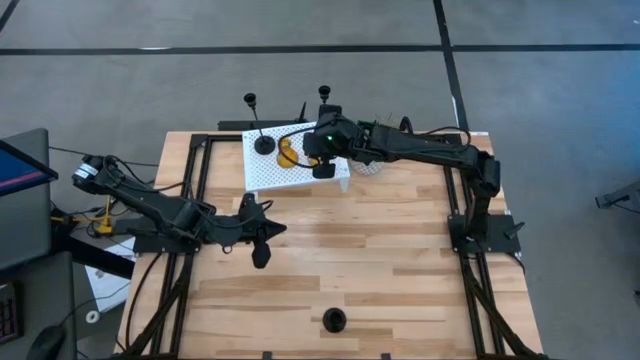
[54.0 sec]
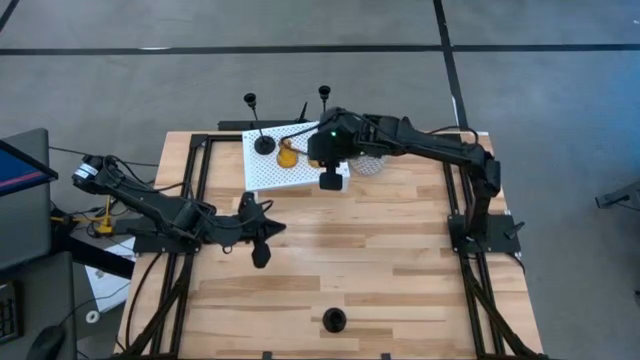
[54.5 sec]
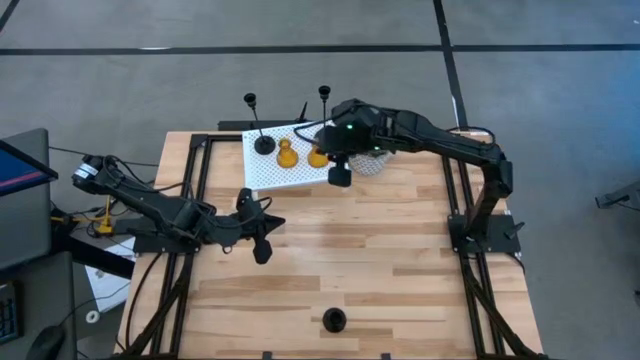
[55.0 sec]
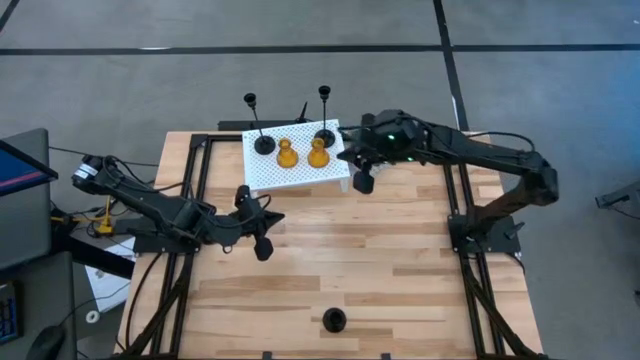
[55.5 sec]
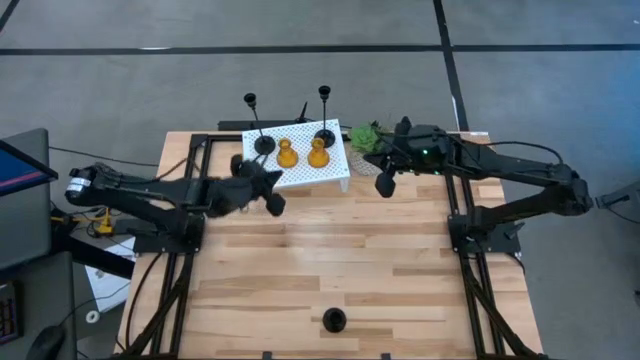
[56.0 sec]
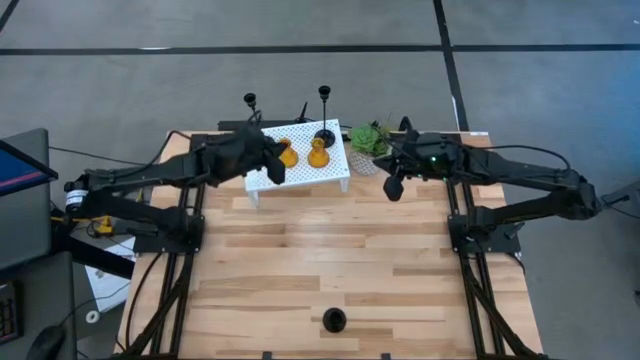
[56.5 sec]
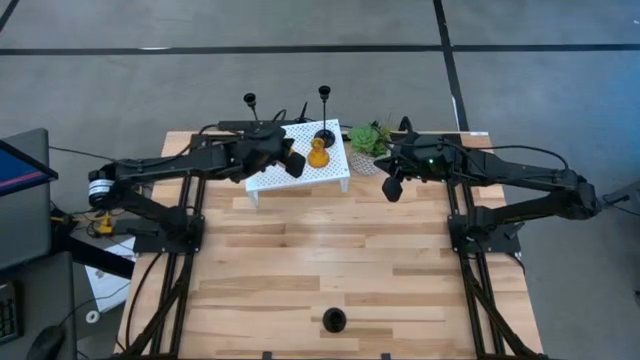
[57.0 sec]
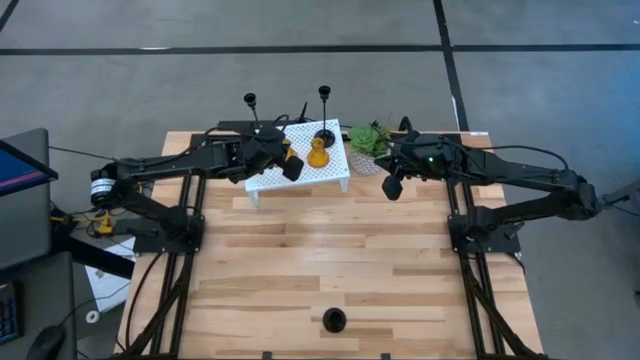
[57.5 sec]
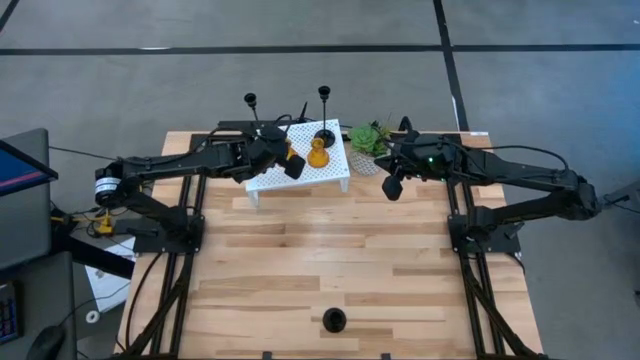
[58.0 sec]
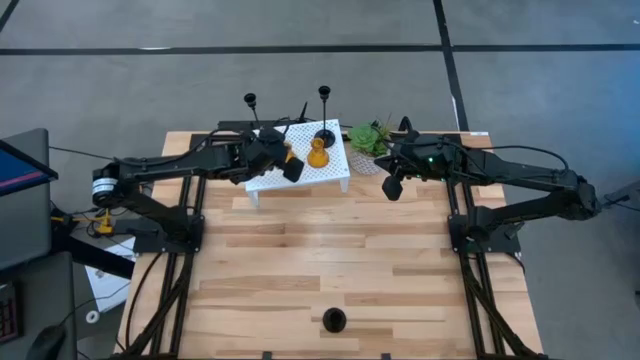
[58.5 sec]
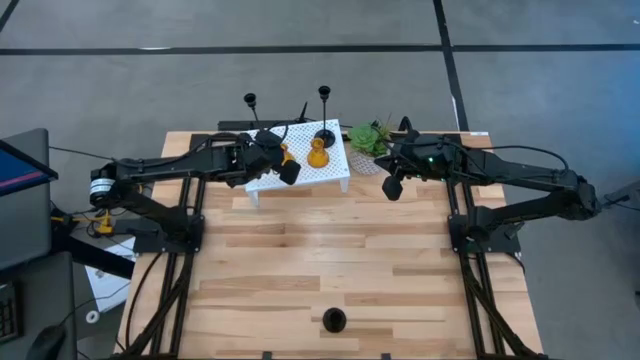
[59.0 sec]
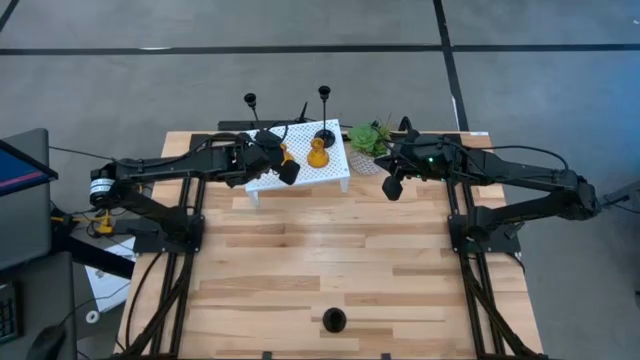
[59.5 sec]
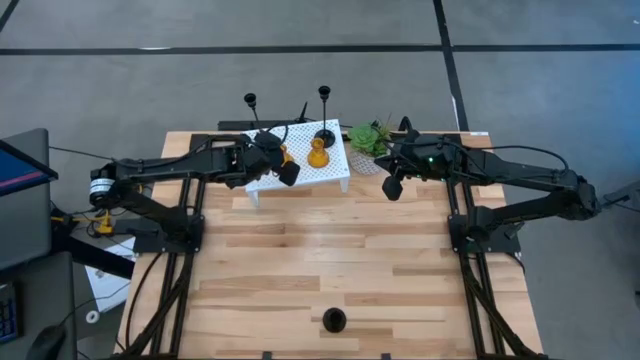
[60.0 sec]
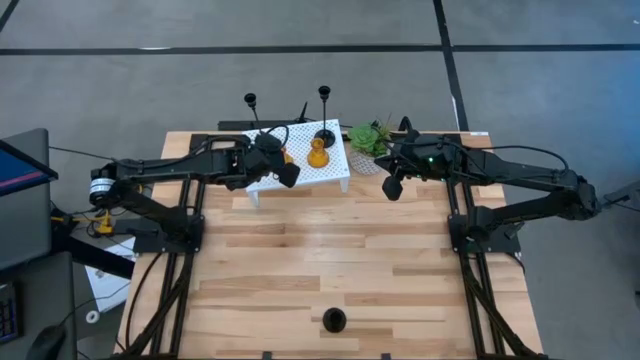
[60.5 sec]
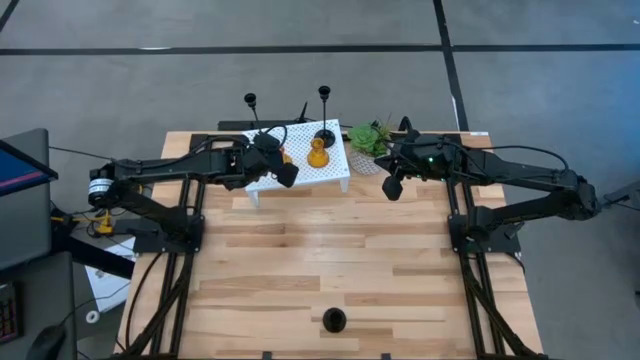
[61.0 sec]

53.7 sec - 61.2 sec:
Task: Pick & Place candle stick holders
Adjust the yellow glass candle holder on the shelf

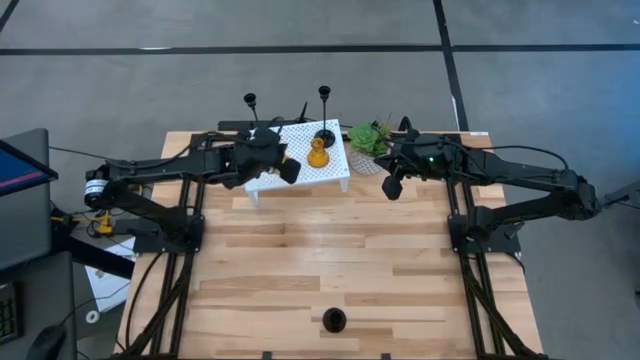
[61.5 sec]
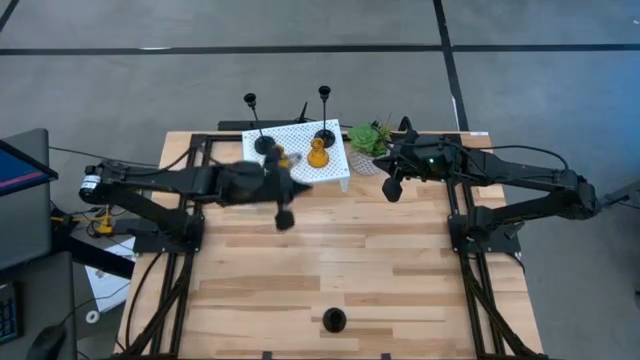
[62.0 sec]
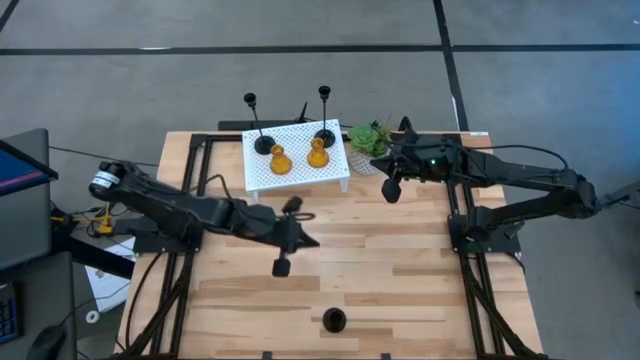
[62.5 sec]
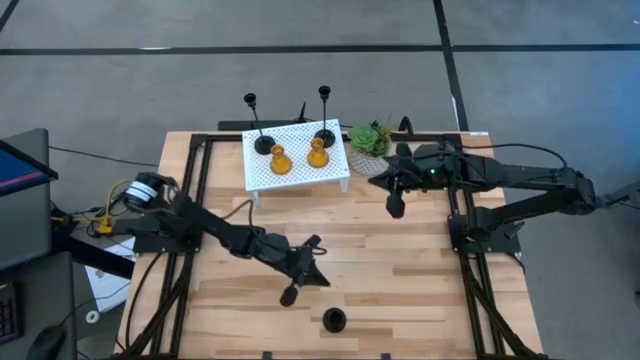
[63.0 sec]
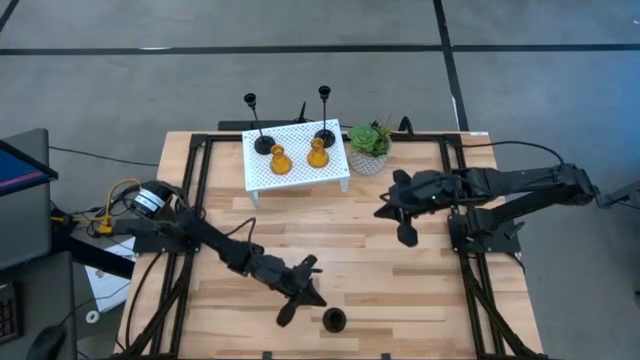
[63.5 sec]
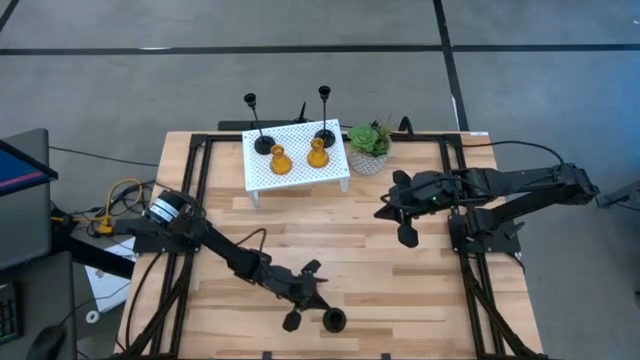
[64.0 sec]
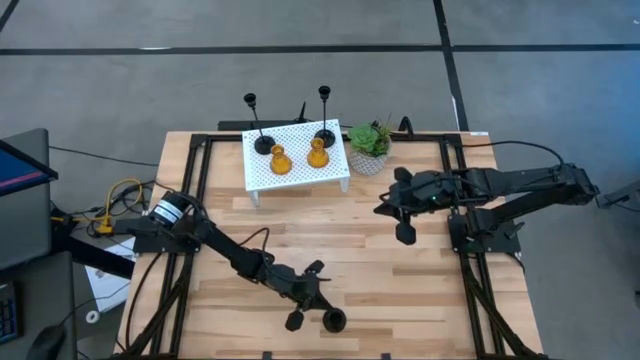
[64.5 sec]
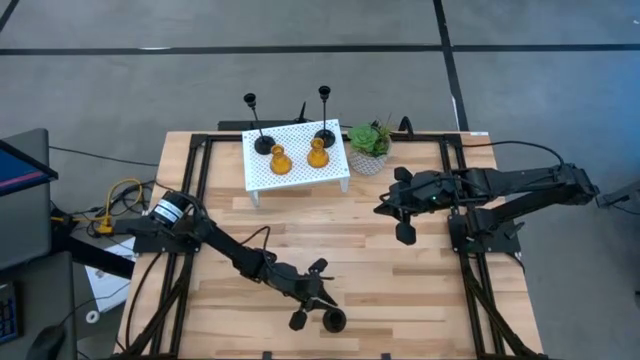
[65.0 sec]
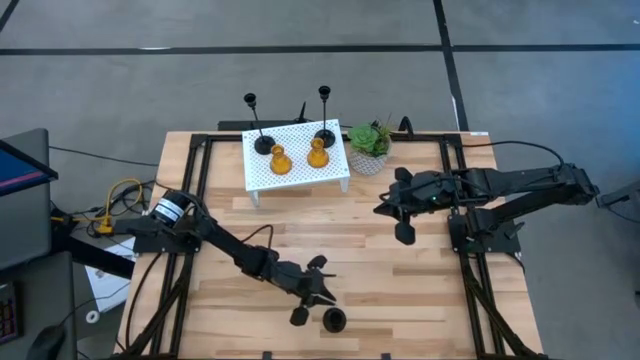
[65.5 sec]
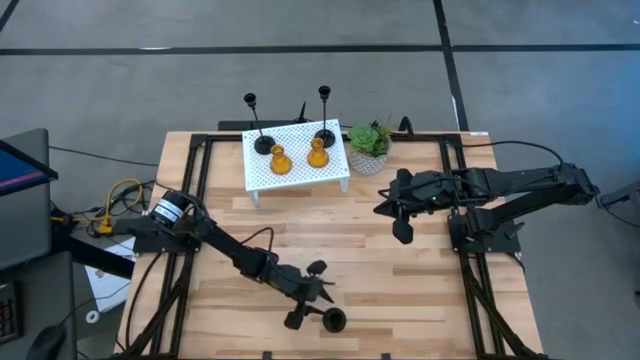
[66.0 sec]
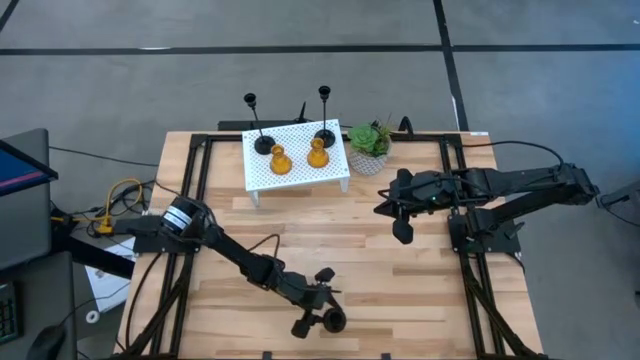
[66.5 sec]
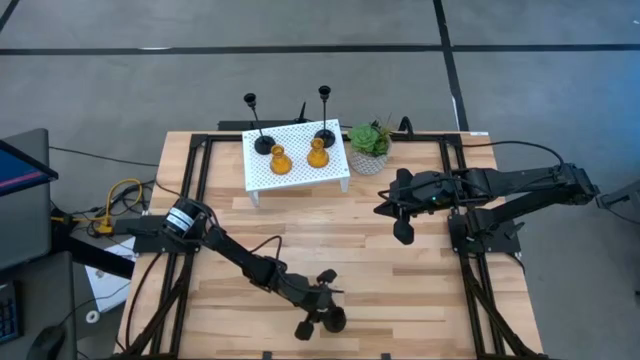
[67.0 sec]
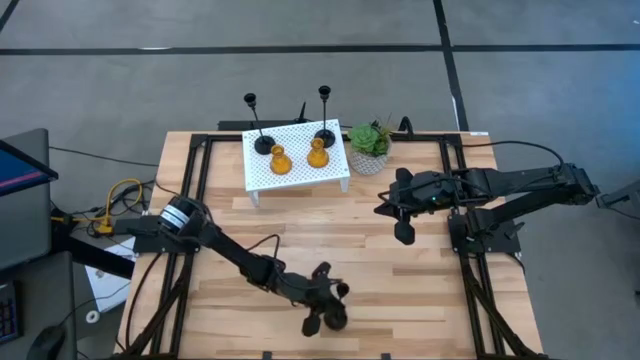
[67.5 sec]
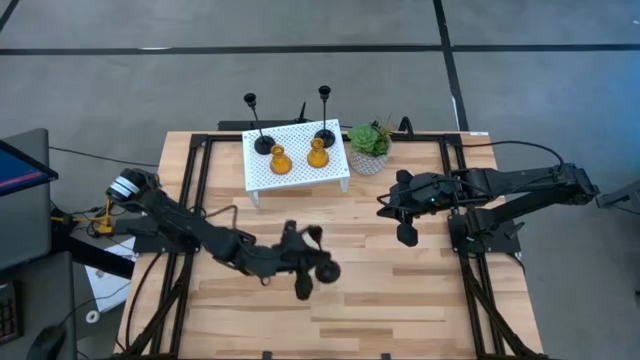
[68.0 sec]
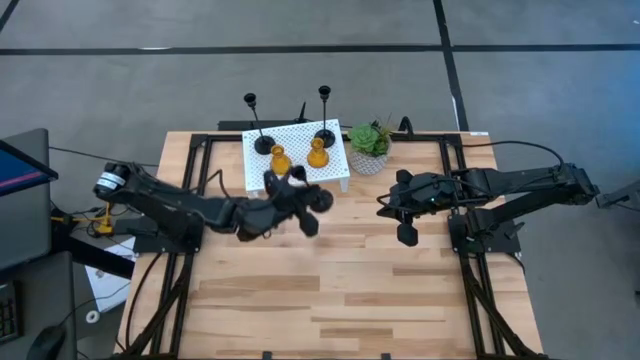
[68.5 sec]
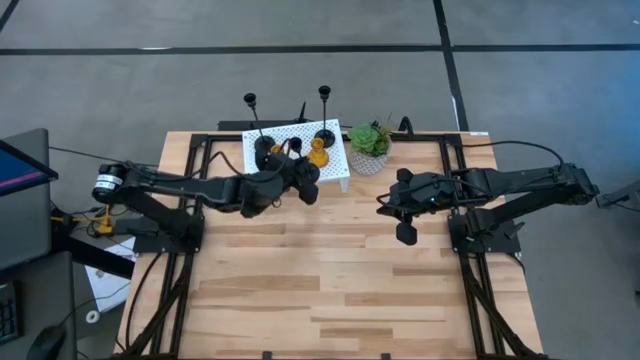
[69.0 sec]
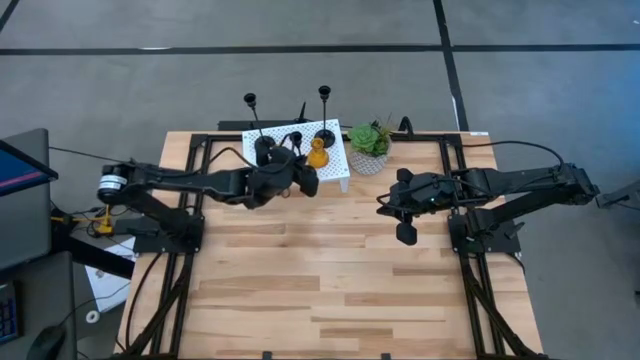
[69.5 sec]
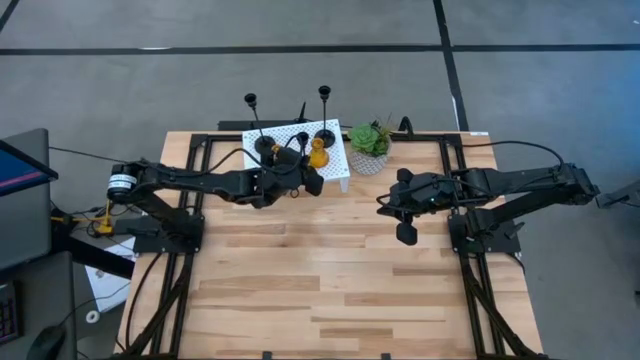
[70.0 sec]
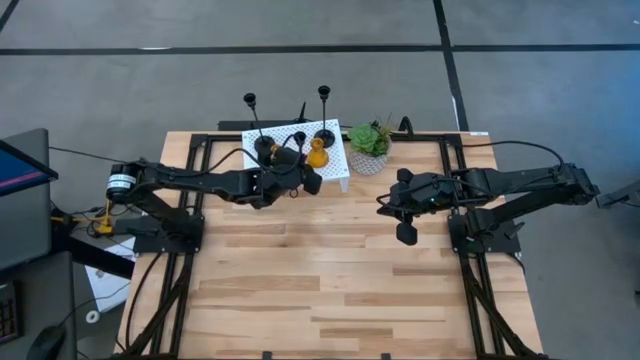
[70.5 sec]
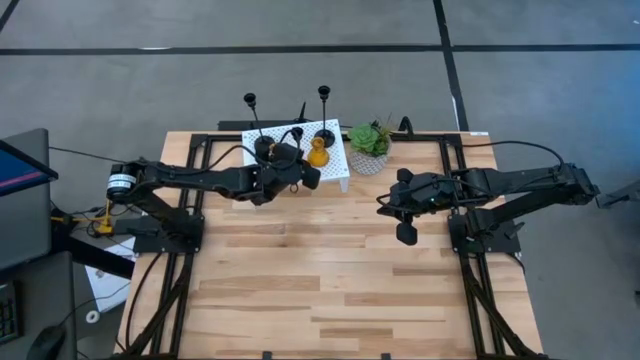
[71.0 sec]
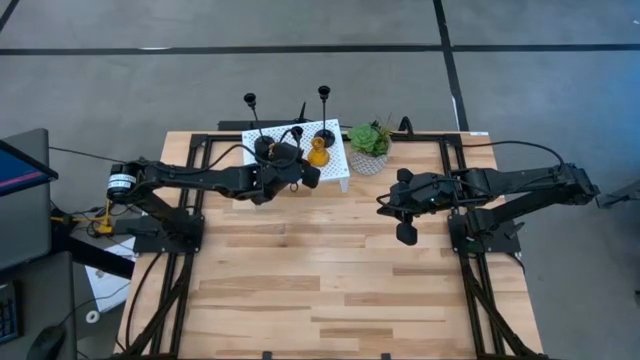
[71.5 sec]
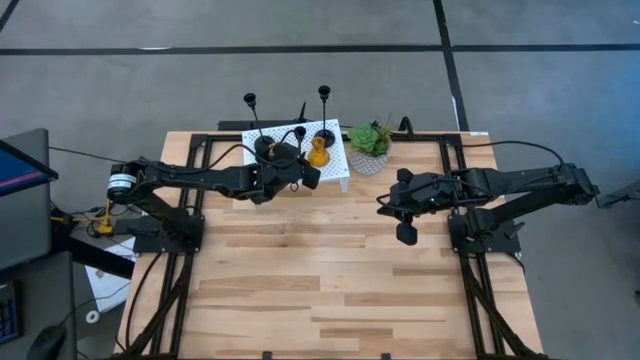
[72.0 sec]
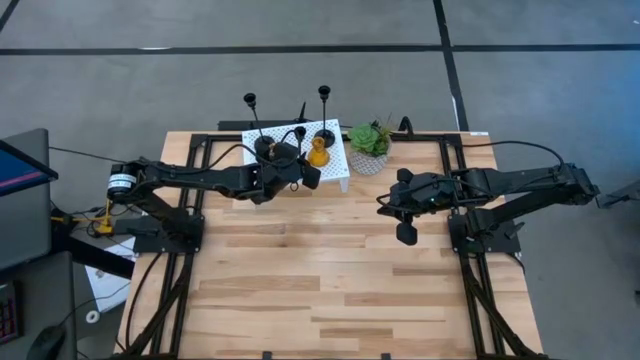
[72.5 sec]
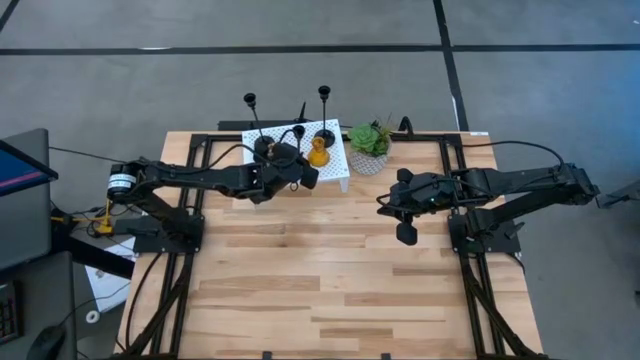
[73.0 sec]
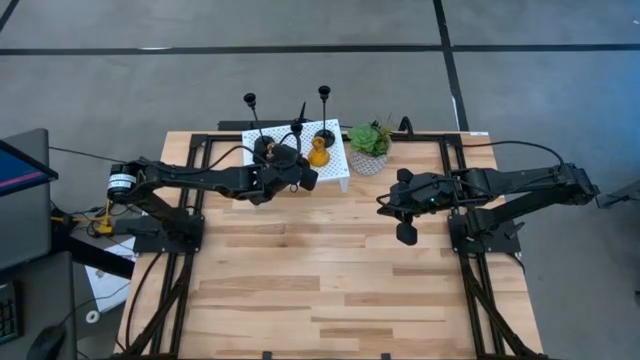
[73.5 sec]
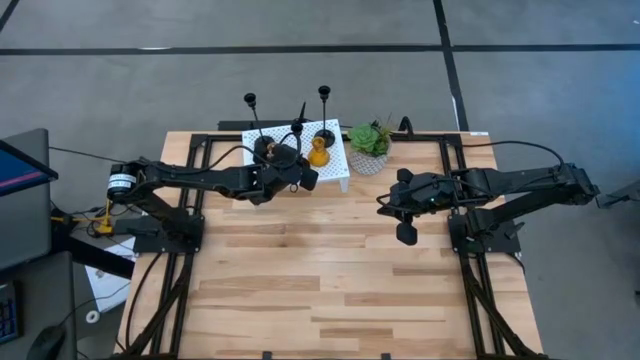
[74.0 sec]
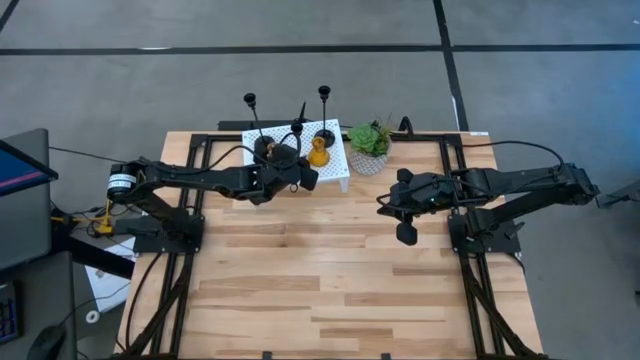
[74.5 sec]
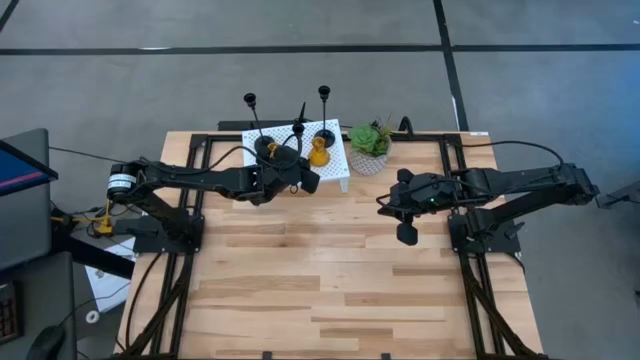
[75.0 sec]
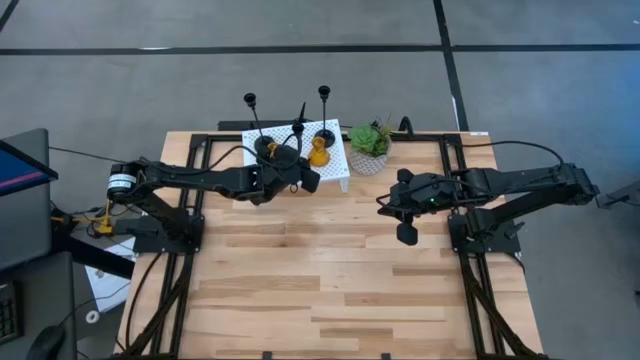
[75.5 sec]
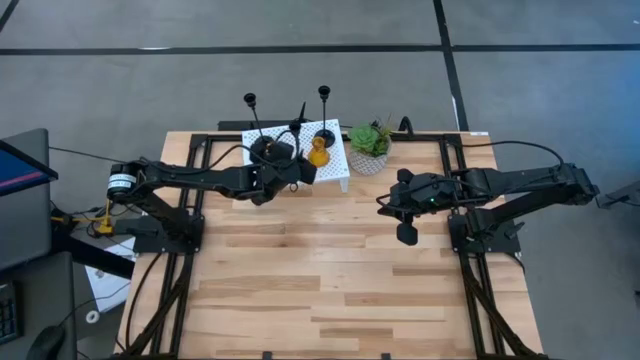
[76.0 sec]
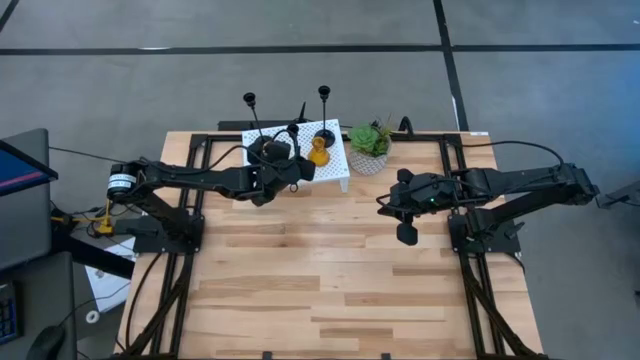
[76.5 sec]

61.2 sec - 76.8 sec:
Put the black candle holder on the shelf
